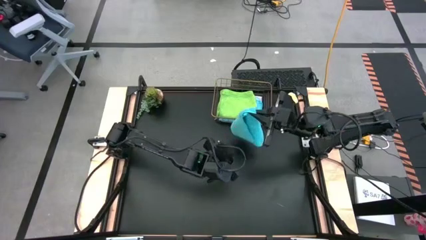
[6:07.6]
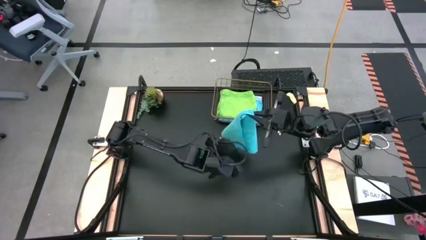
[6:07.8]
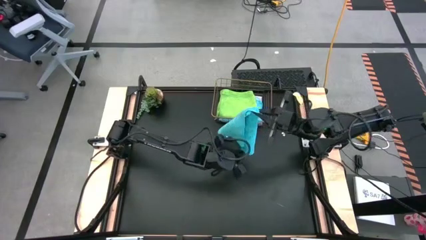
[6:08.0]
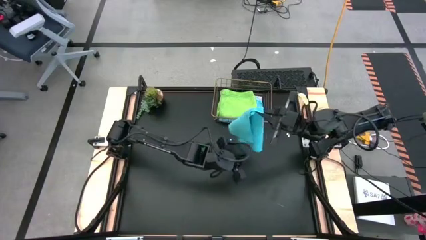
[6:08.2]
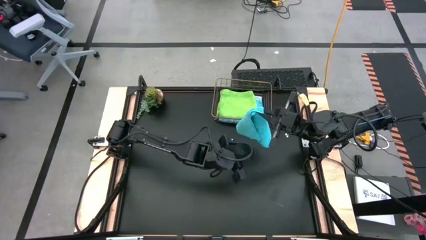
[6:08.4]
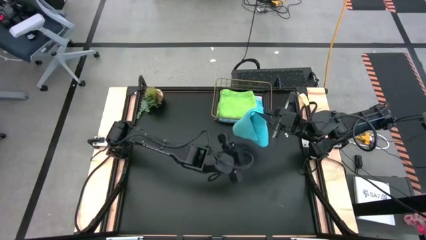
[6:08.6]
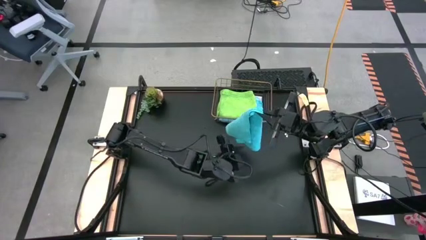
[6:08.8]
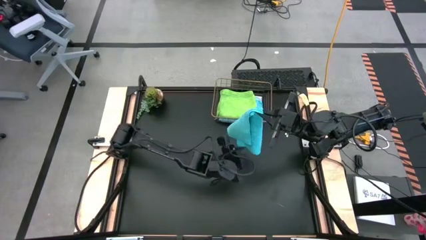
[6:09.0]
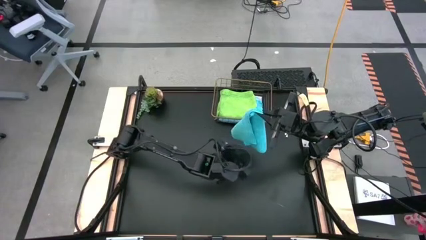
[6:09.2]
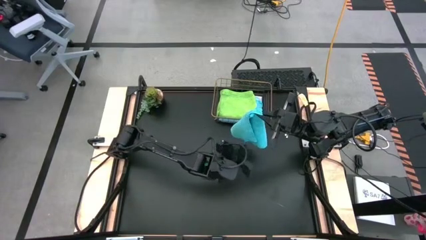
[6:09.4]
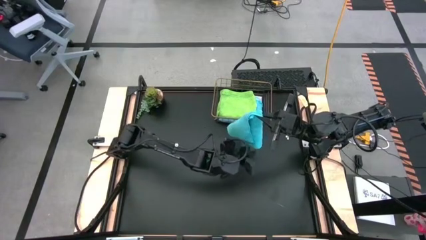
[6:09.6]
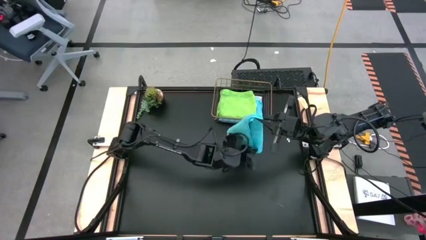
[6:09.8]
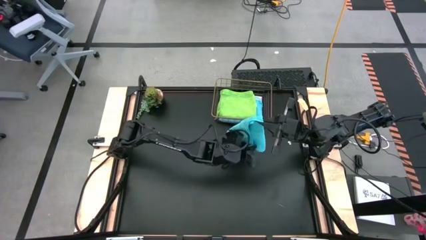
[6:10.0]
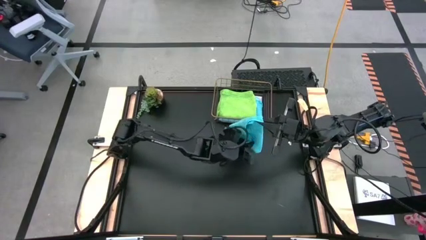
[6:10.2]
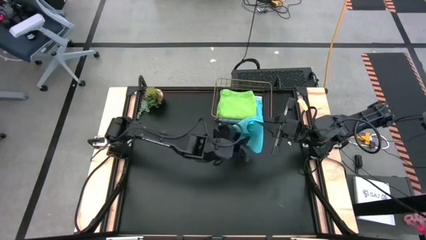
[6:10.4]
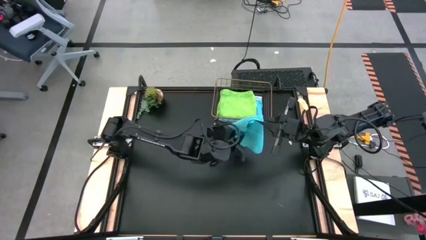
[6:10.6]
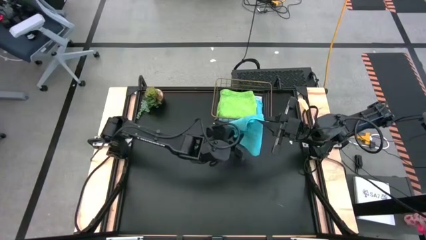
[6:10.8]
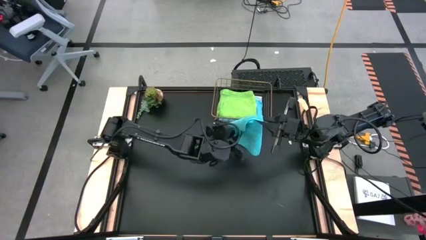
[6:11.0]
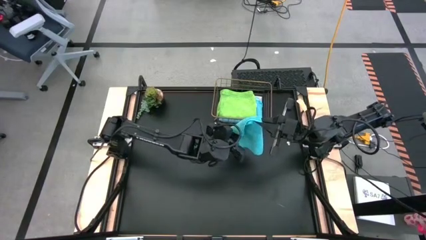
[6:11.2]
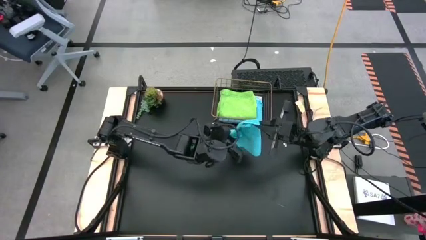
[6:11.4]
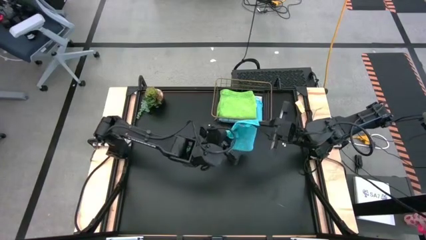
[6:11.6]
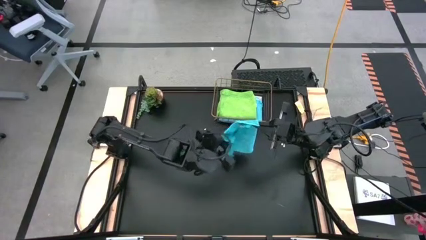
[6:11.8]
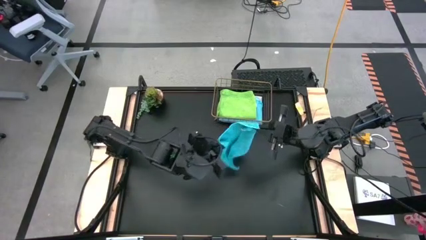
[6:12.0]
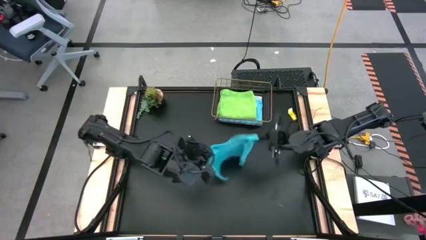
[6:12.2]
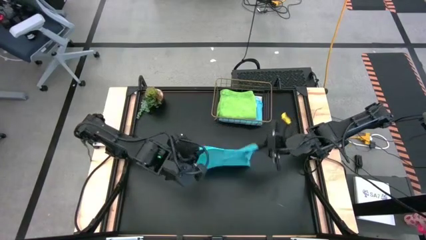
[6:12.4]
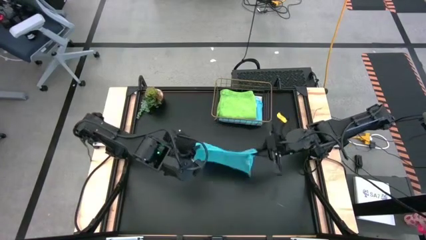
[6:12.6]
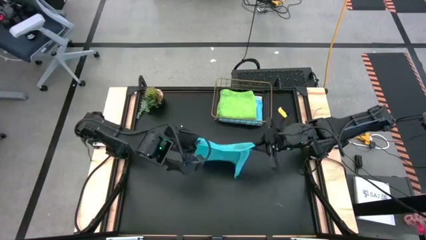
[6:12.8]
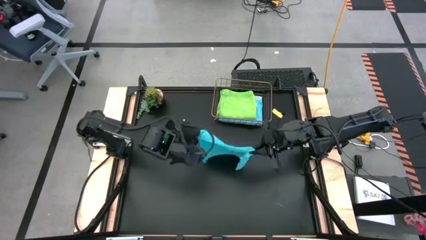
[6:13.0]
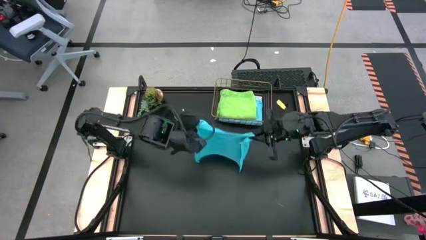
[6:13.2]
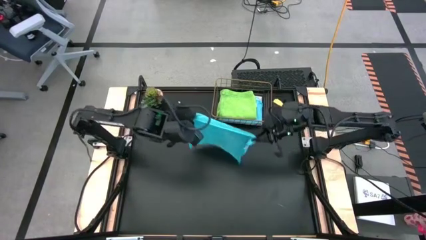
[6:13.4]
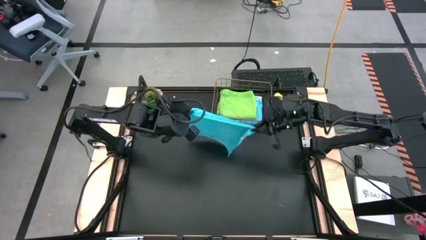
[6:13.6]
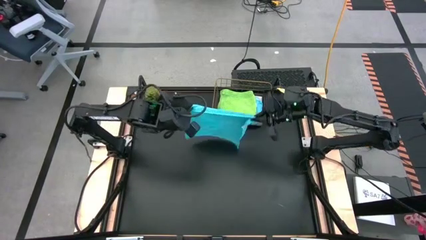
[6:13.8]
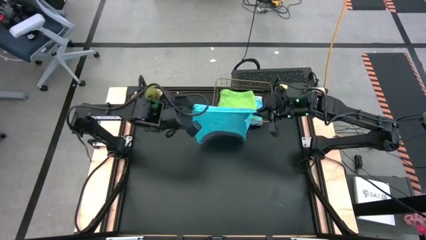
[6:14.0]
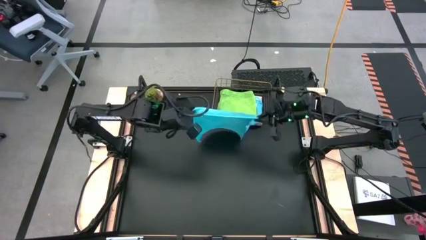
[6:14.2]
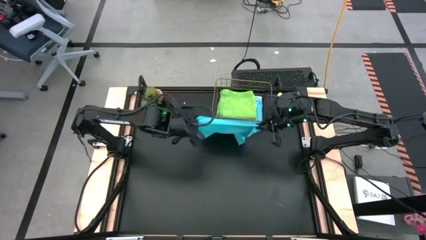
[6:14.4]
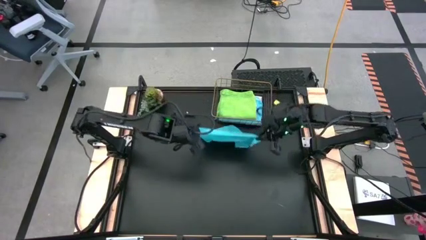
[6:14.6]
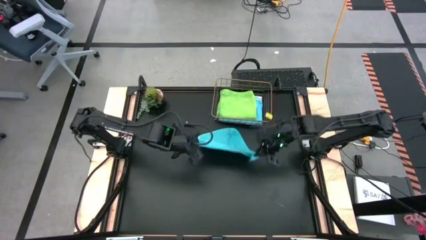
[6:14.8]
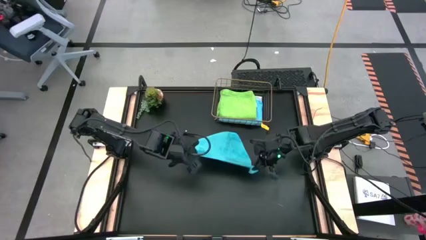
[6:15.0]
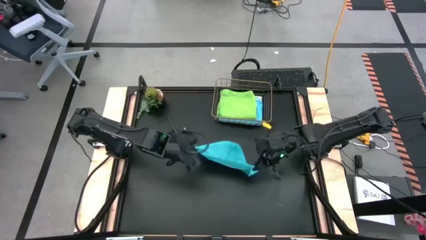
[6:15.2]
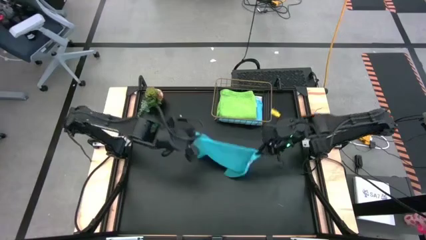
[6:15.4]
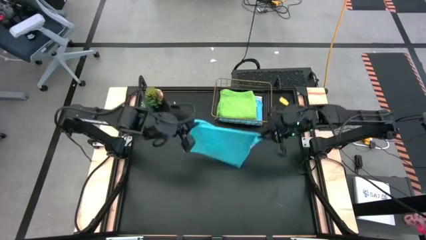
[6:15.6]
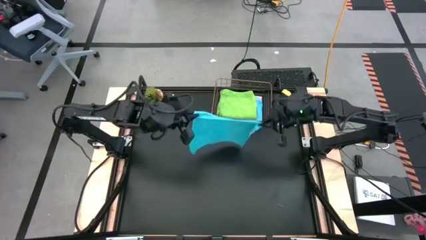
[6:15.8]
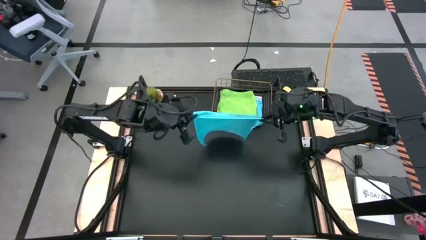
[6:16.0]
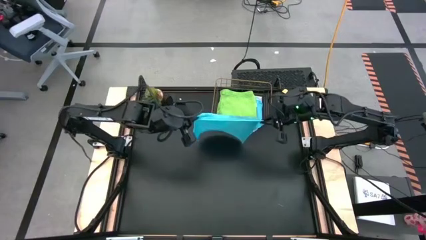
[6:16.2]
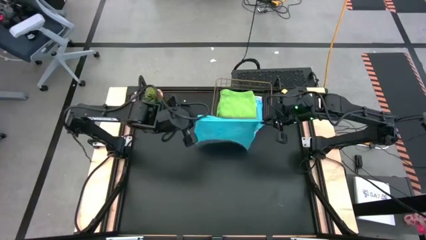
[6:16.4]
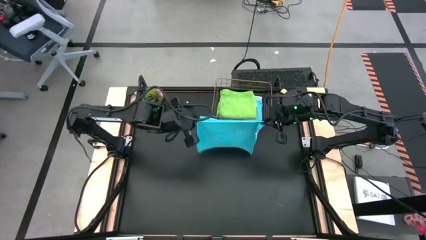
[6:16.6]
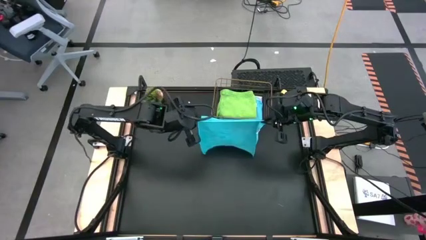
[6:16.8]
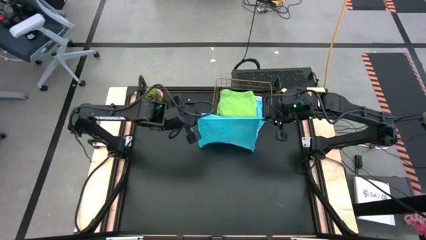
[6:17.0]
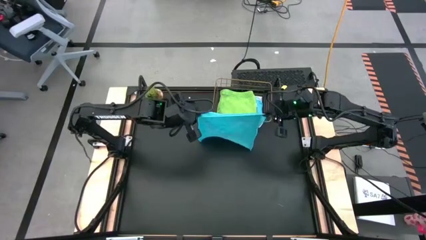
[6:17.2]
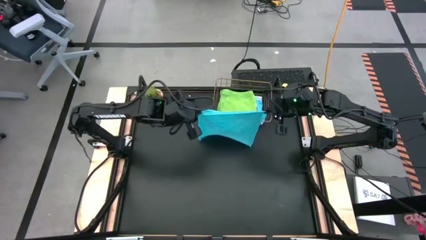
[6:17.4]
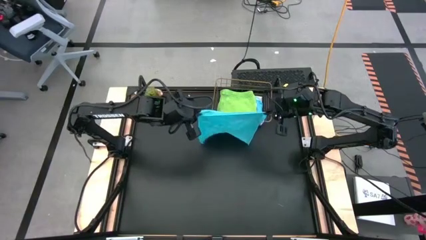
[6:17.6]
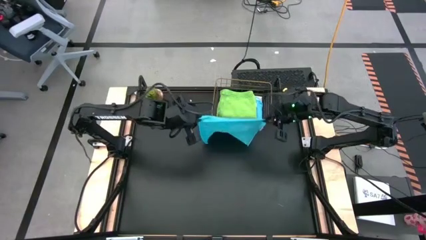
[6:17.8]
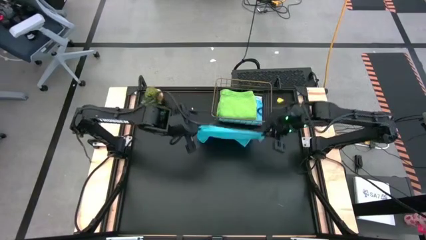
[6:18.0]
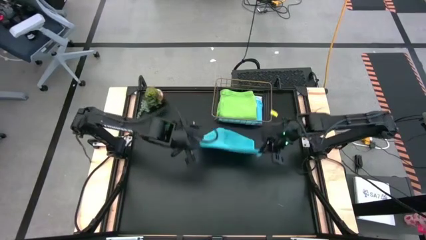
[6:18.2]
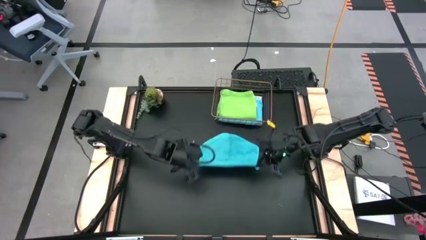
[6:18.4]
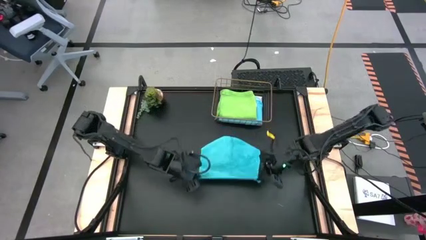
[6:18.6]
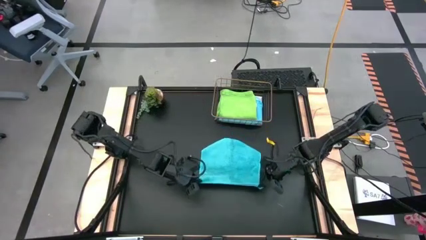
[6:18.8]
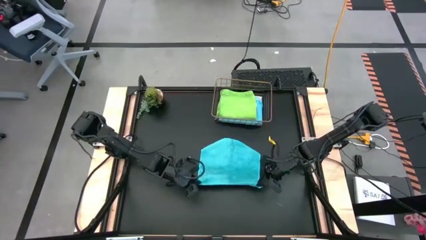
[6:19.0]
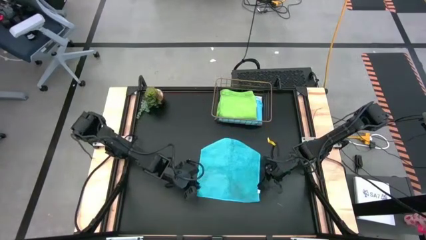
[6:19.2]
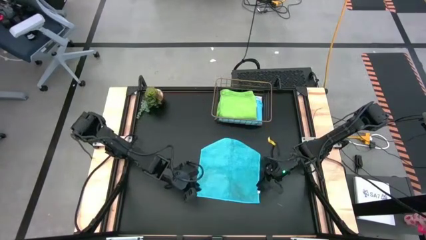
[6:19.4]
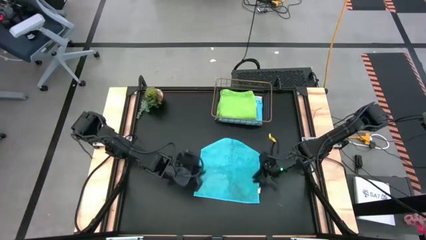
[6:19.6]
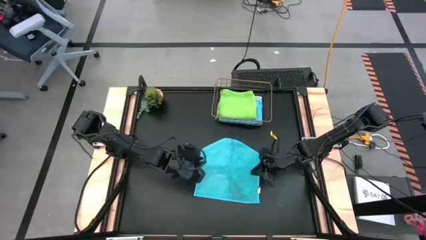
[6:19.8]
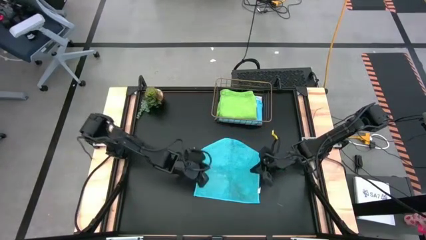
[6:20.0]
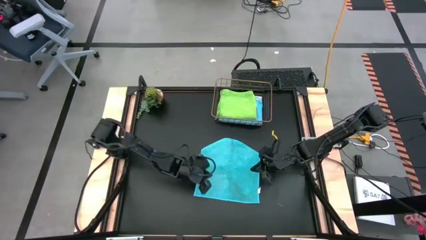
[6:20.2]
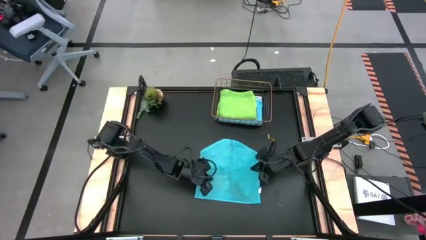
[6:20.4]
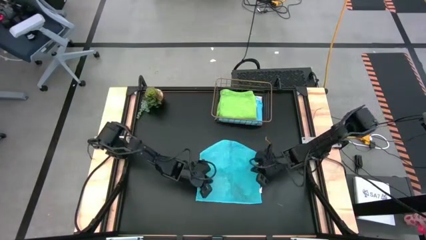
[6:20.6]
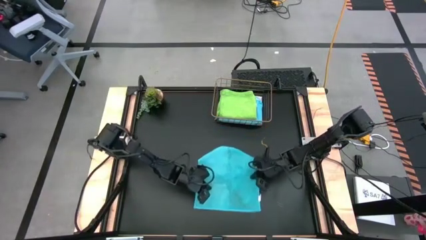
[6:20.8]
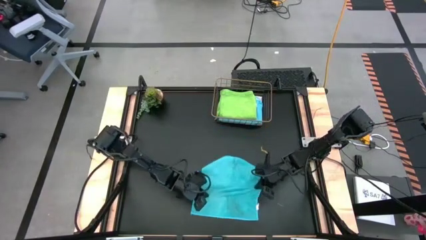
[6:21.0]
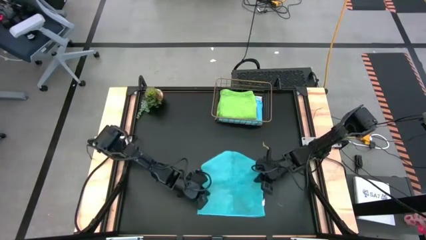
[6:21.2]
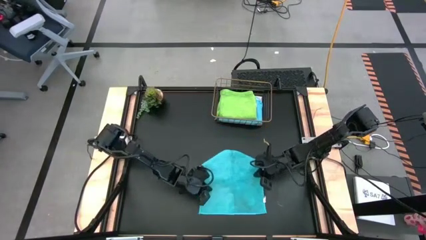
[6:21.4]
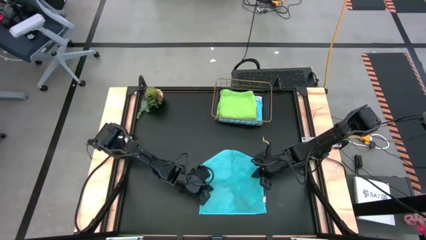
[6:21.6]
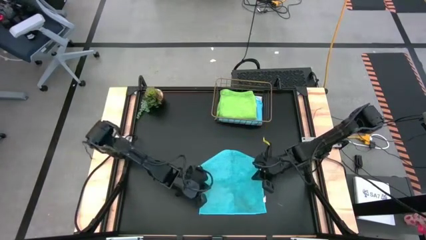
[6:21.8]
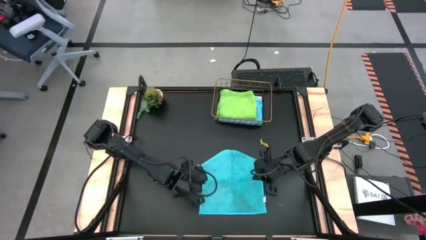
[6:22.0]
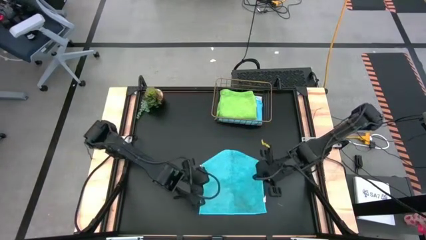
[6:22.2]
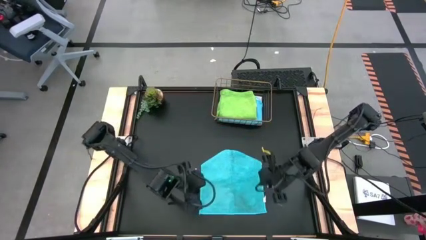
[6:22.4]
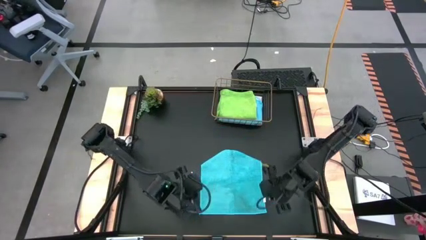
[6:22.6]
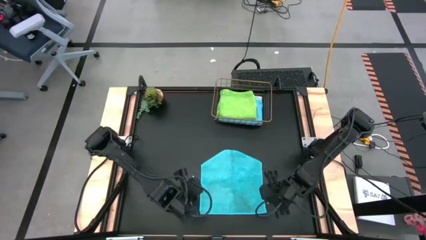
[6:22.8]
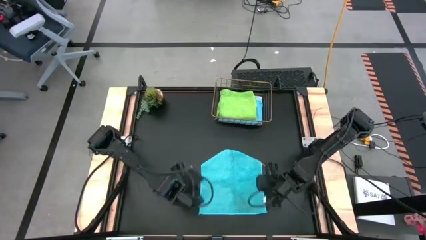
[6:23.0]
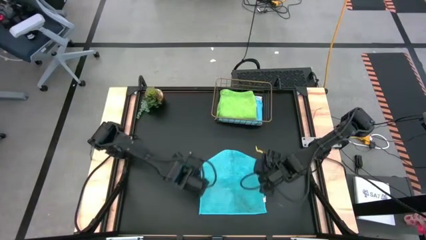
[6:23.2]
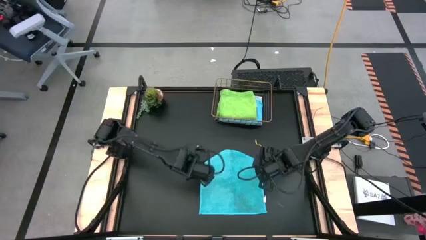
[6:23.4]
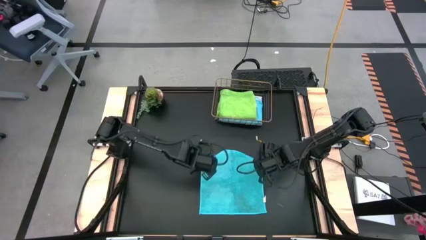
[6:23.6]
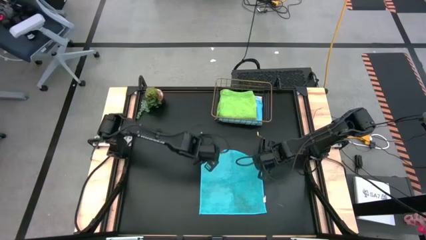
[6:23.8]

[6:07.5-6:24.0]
Task: Fold microfiber towels
Fold the blue towel
